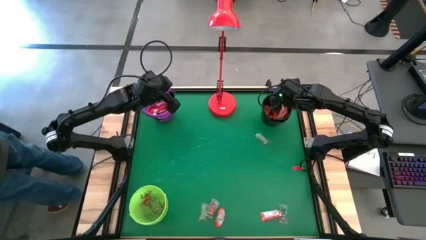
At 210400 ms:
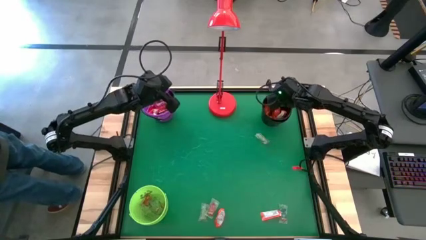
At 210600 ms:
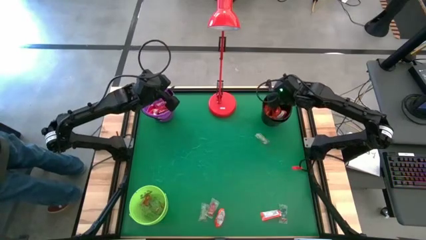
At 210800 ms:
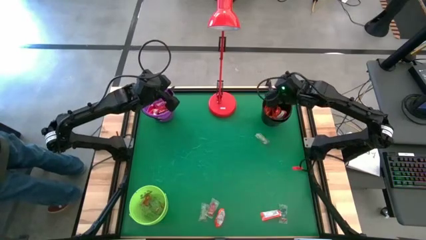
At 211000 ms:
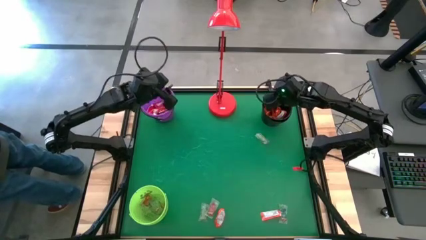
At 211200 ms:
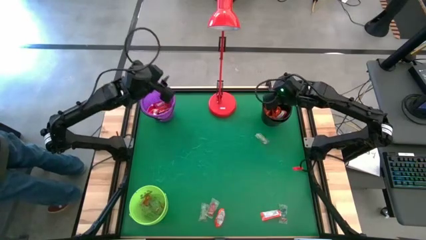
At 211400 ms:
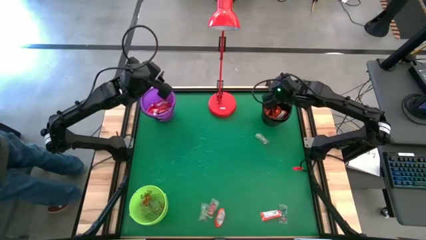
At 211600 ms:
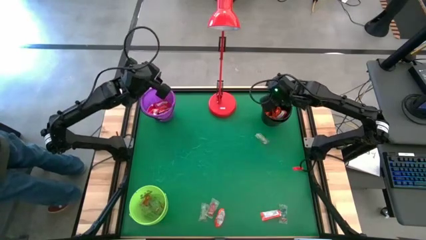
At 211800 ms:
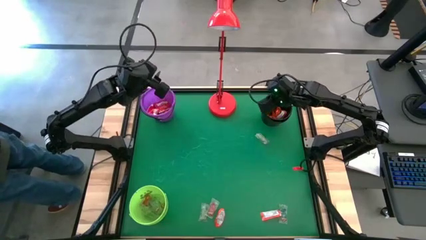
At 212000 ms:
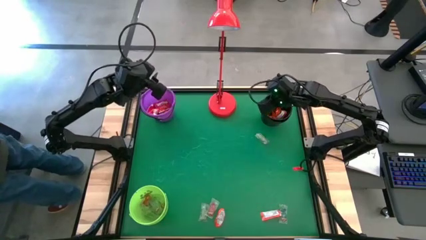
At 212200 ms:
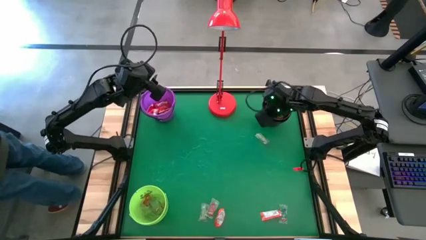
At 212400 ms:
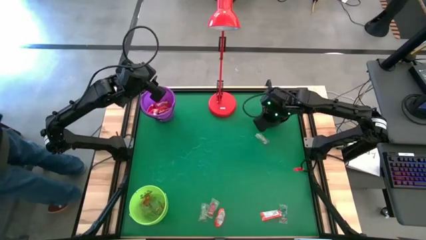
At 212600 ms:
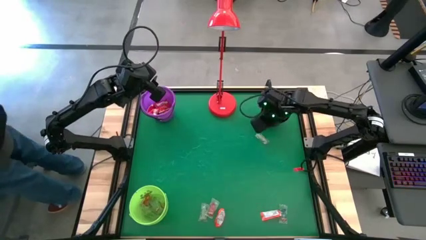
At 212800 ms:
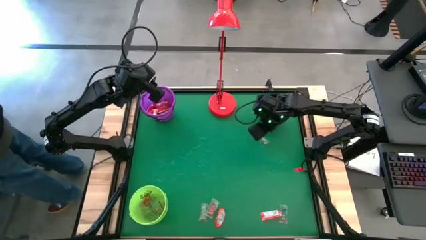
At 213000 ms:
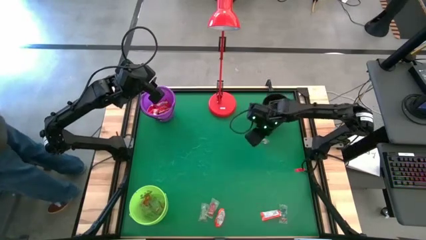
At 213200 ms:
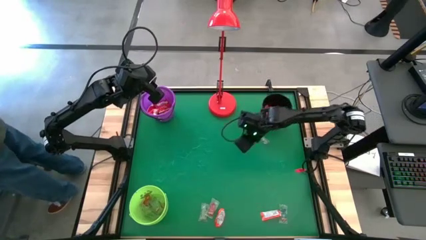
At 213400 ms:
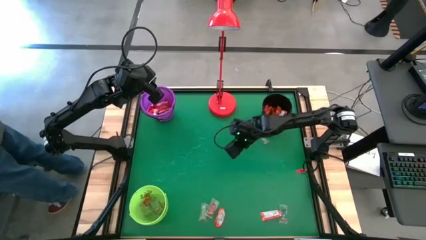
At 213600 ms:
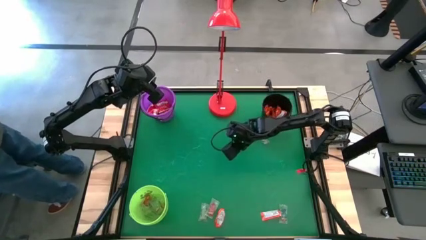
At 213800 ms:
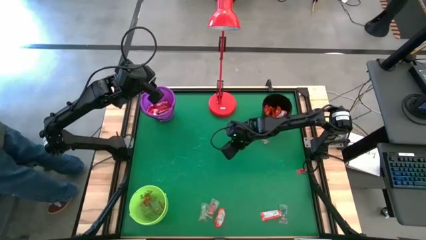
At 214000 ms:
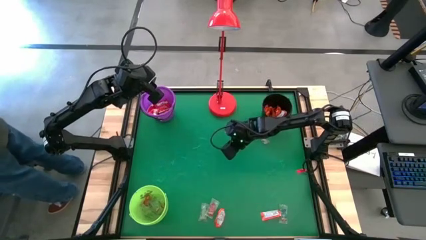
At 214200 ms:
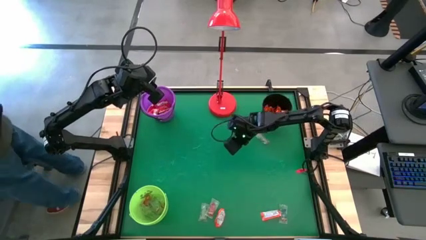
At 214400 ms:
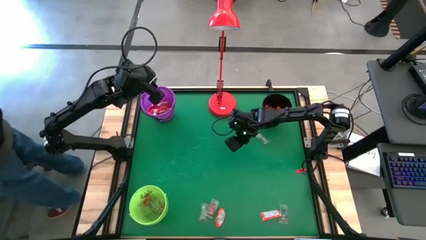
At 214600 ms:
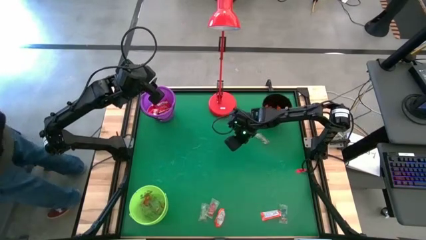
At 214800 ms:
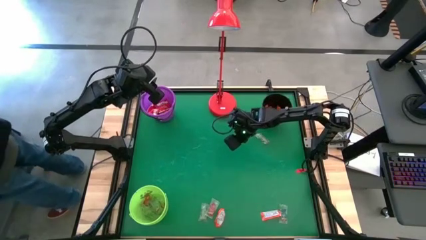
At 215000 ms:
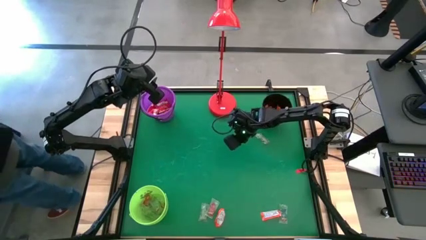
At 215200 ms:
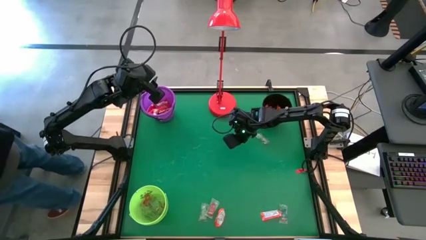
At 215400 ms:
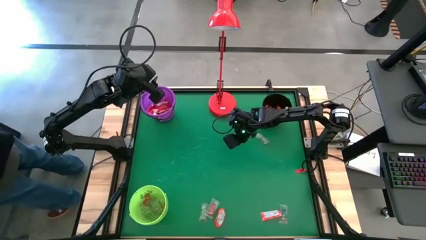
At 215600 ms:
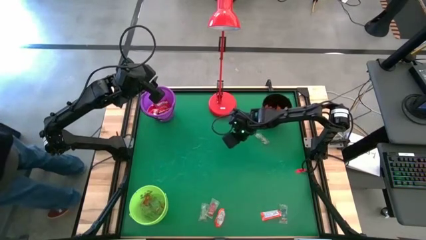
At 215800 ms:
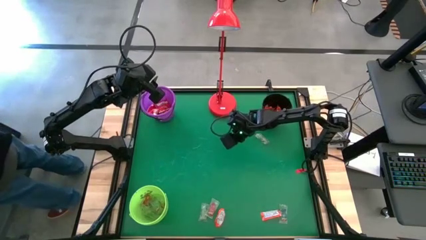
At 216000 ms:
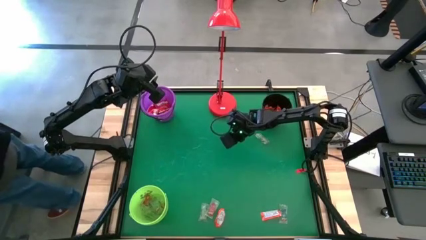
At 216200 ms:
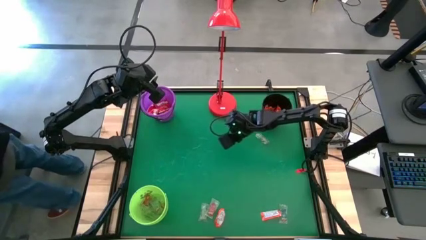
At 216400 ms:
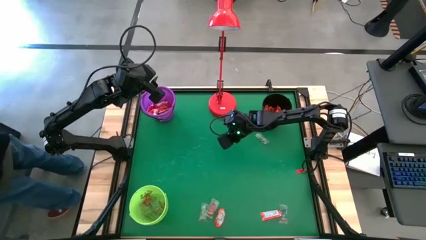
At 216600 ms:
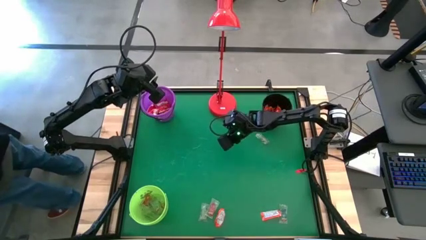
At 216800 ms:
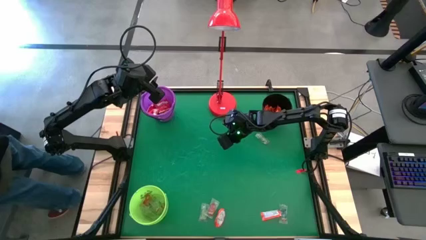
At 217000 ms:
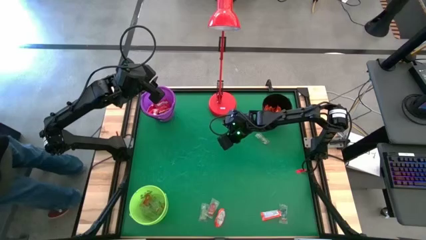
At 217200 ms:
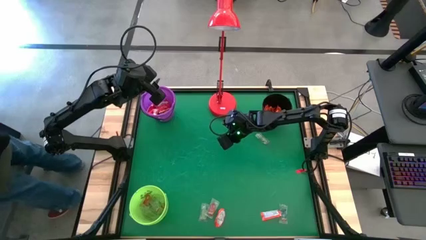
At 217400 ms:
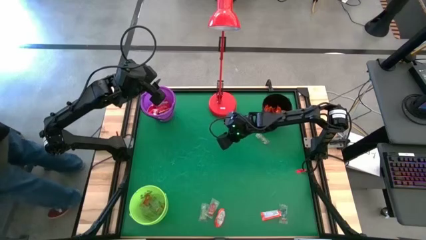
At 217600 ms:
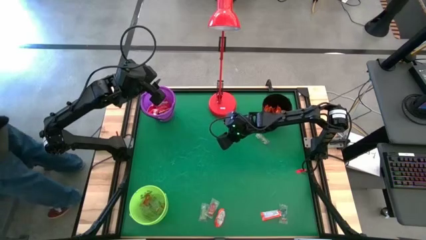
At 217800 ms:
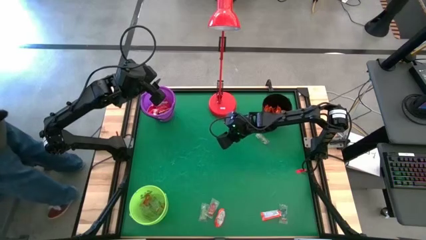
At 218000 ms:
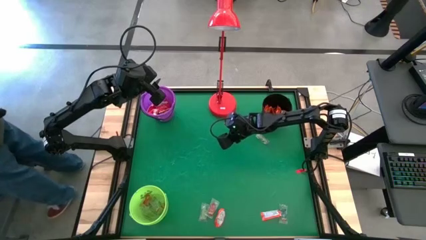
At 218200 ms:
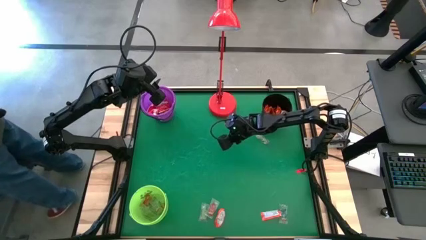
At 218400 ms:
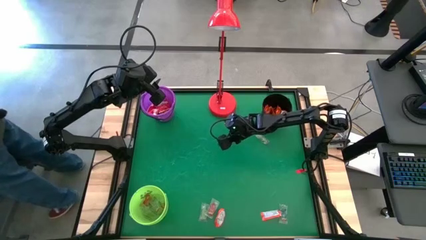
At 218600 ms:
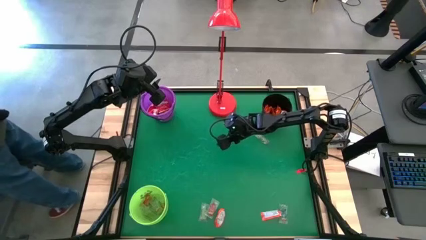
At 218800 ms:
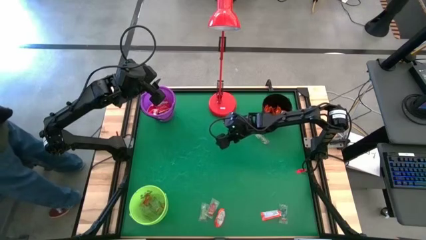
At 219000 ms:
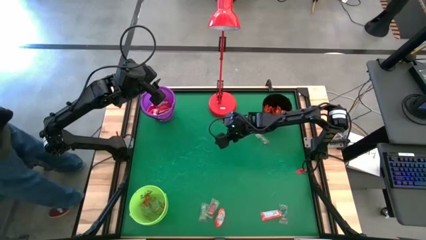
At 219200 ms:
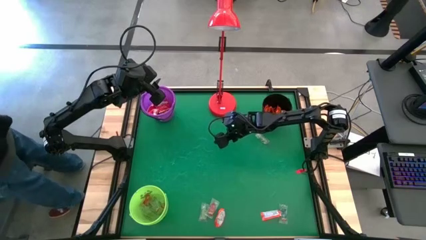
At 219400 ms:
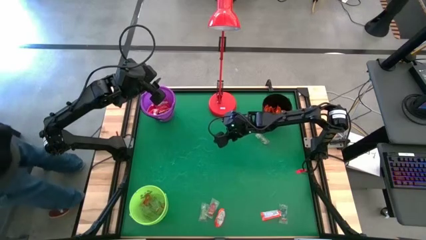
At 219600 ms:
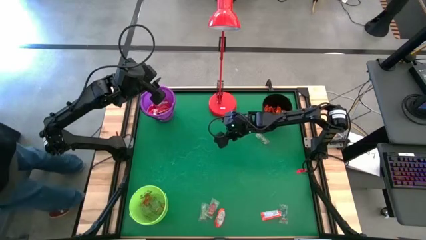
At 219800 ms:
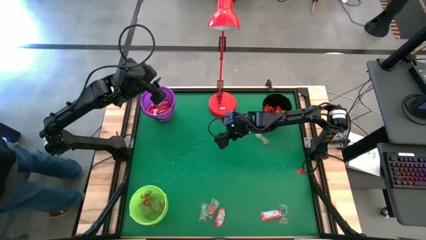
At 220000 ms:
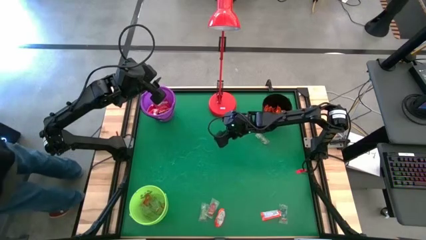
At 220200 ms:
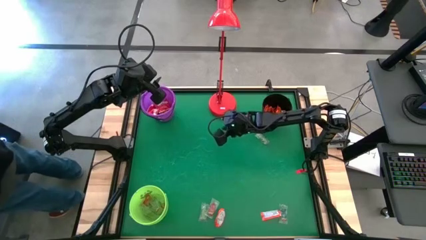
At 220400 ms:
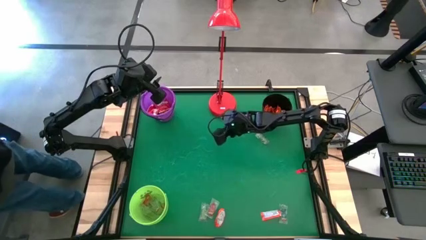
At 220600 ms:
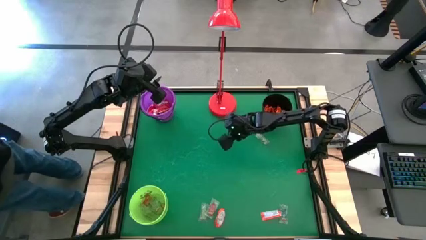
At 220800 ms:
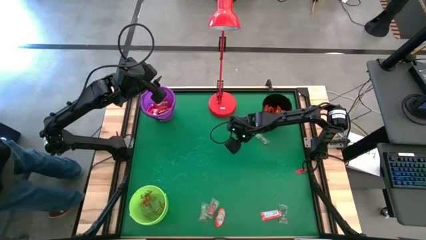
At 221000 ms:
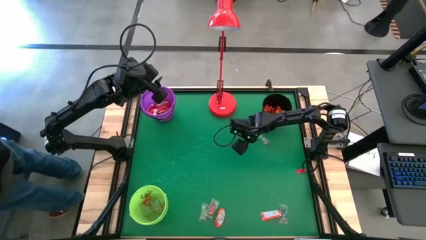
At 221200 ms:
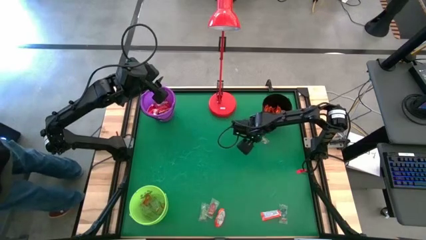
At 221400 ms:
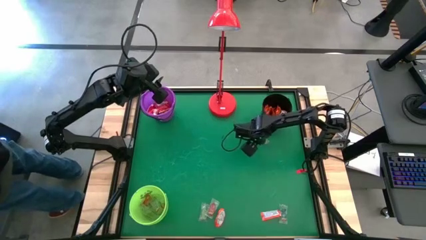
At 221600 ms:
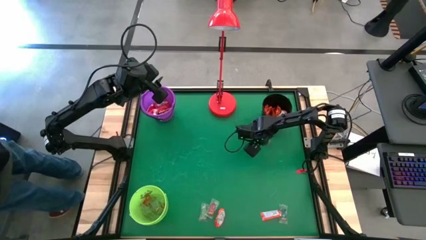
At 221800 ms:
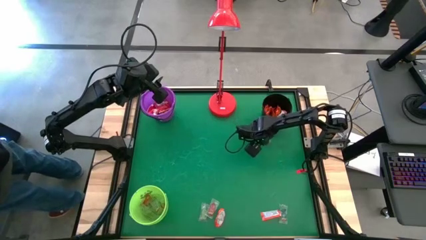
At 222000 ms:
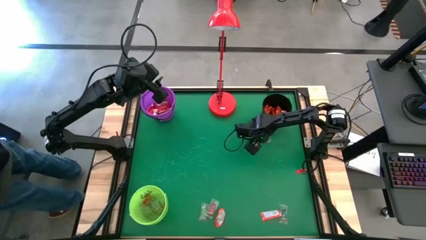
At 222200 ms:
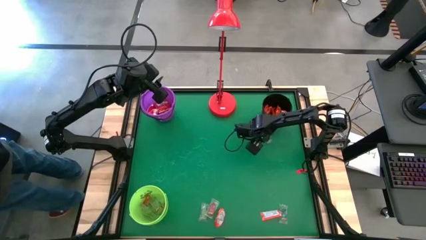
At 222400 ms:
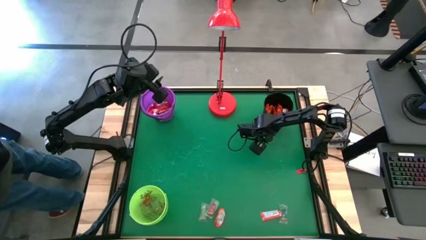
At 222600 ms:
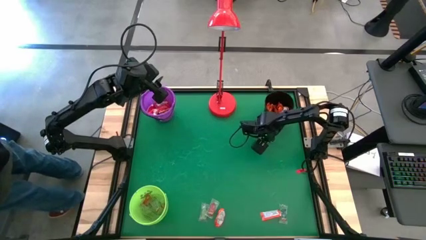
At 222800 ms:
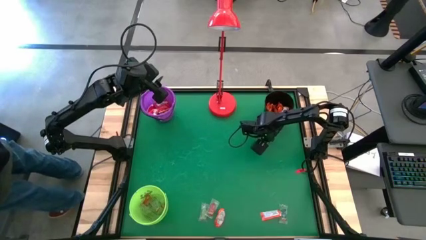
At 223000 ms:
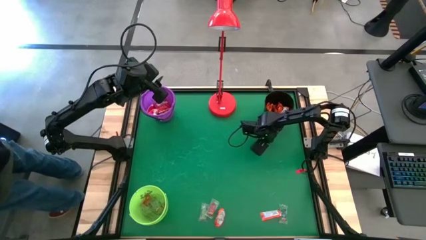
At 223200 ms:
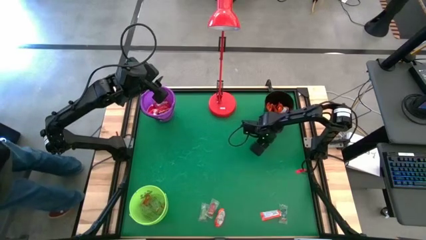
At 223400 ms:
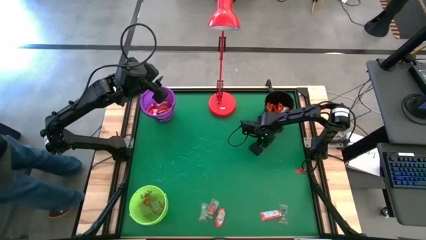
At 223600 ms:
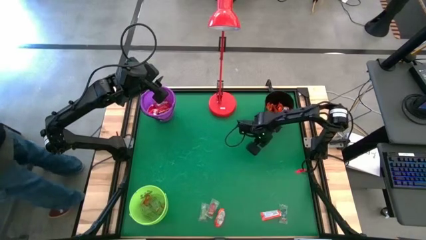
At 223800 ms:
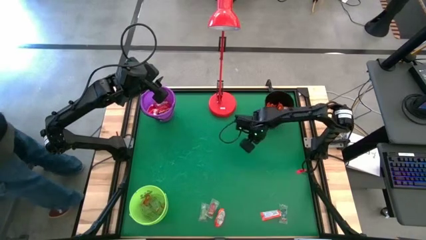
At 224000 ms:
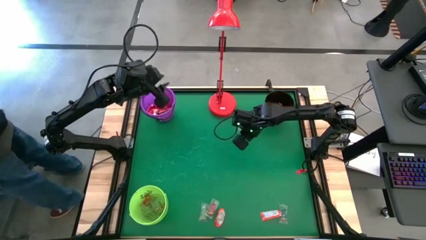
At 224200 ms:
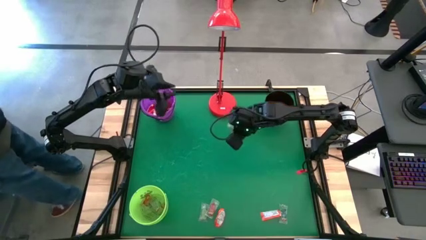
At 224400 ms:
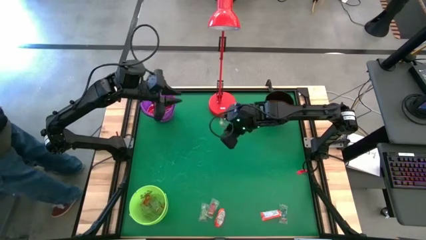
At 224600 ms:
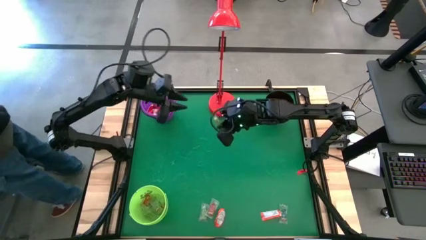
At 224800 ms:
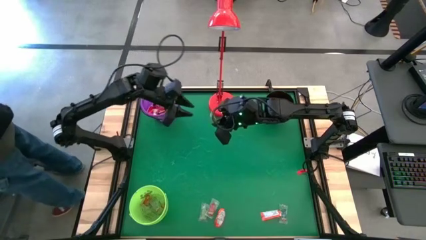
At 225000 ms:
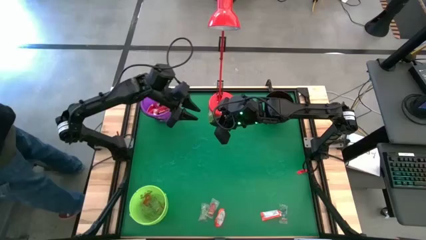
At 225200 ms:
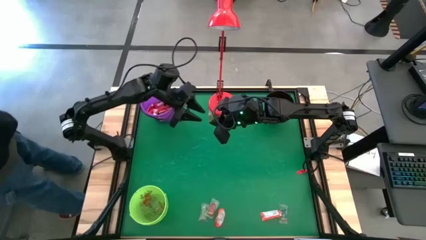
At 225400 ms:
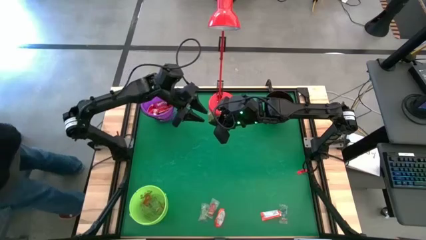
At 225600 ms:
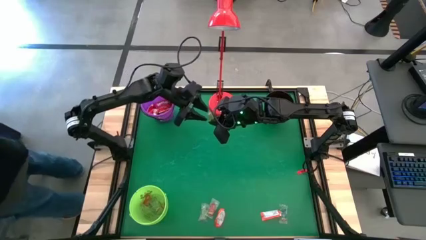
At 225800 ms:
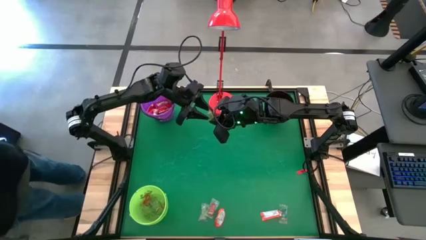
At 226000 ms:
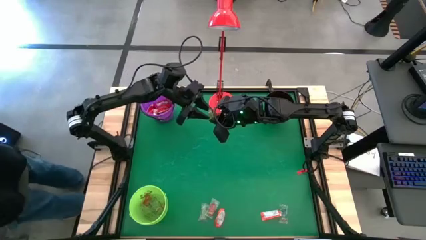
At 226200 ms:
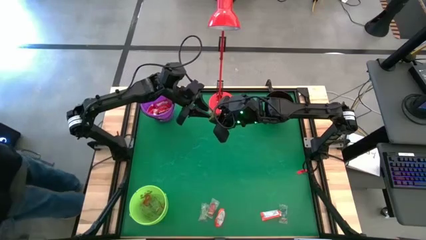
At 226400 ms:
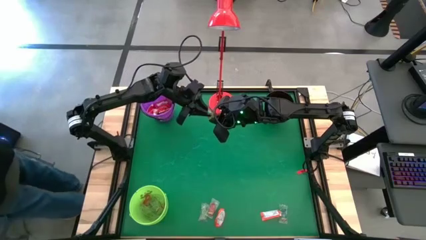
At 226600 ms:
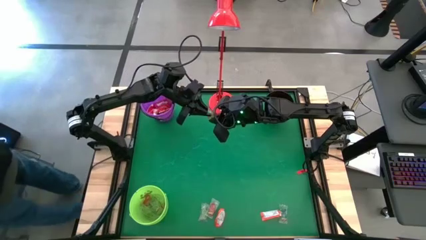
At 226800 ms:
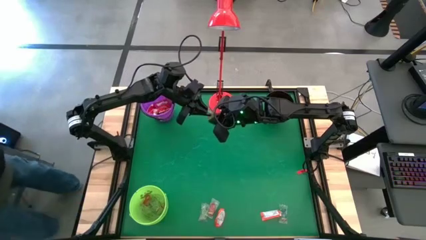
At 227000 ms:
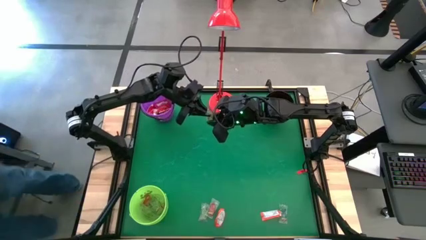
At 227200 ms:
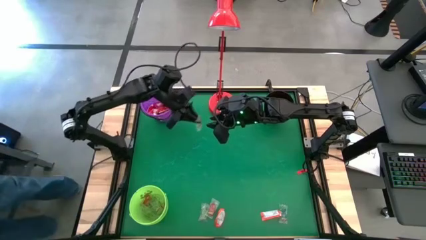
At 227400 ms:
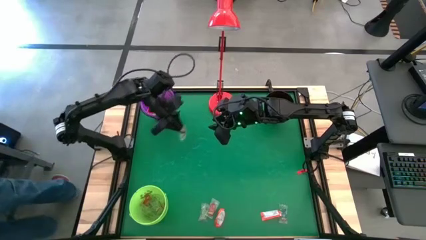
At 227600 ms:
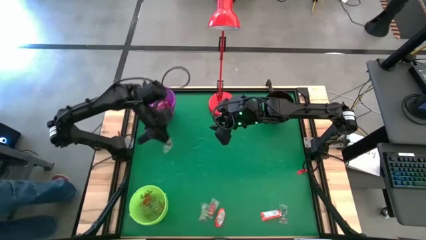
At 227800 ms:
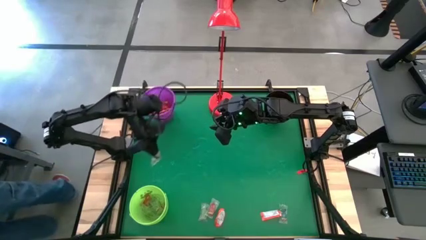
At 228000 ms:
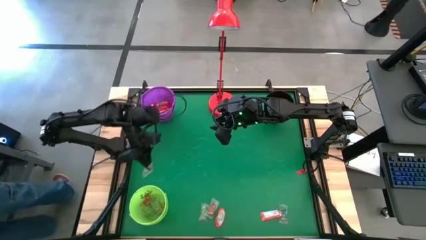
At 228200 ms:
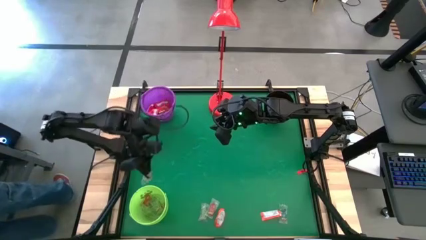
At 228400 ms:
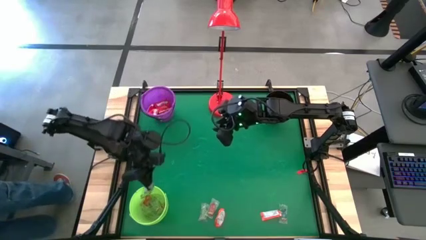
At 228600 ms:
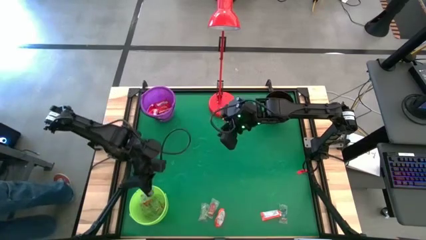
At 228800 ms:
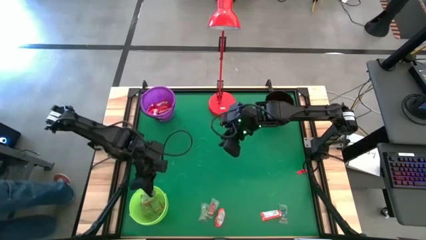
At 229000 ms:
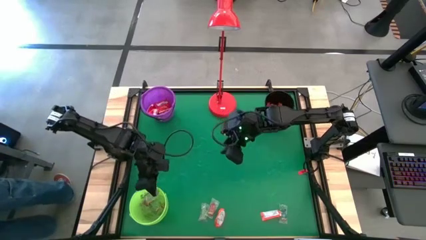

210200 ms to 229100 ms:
Task: Sort candy
Put the green gummy into the light green bucket
